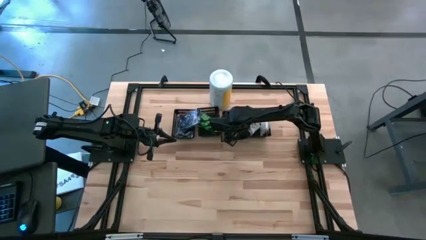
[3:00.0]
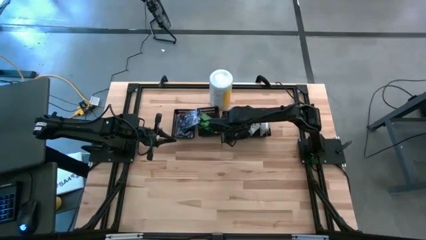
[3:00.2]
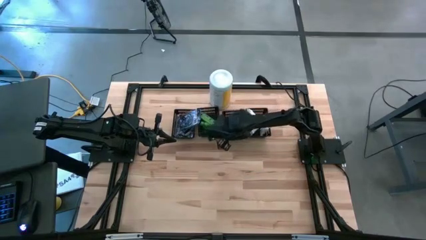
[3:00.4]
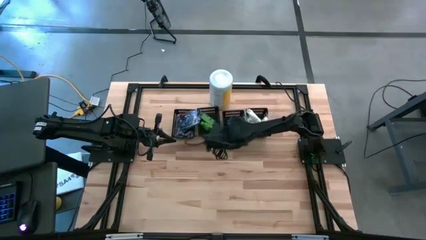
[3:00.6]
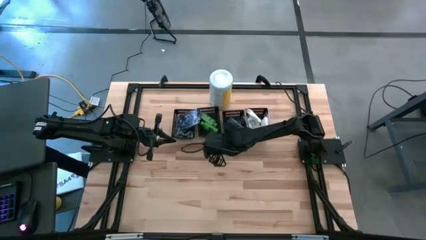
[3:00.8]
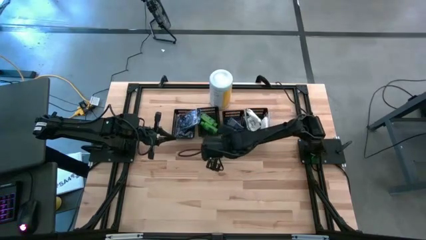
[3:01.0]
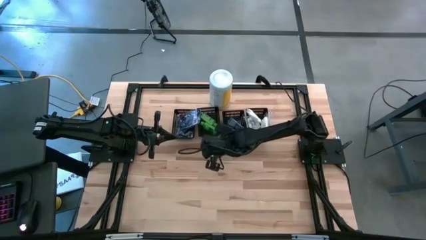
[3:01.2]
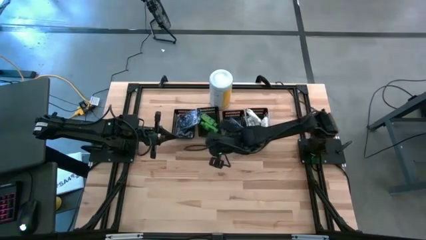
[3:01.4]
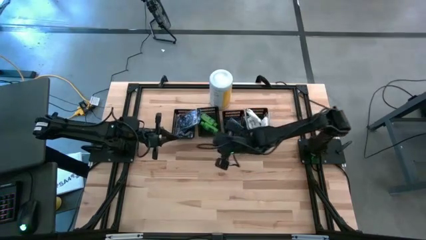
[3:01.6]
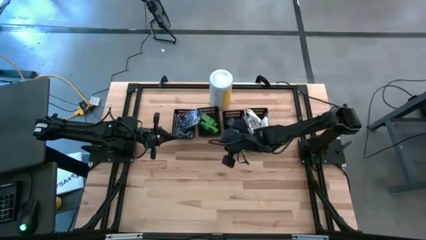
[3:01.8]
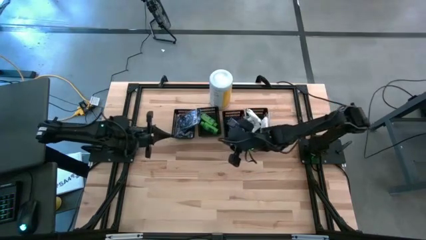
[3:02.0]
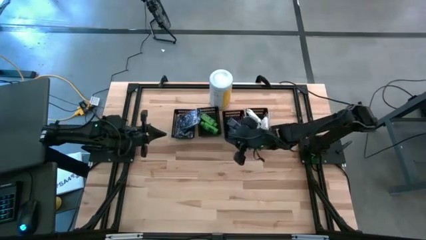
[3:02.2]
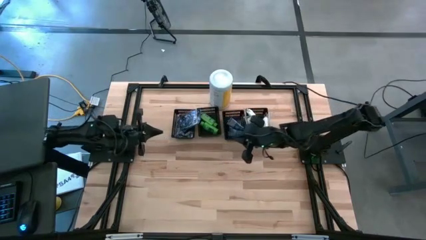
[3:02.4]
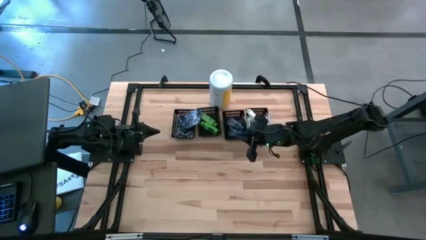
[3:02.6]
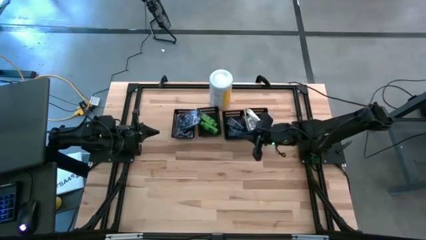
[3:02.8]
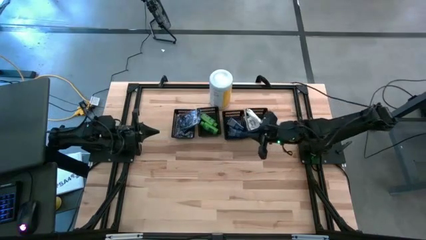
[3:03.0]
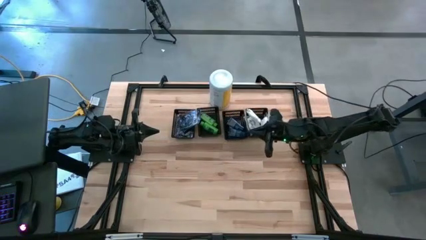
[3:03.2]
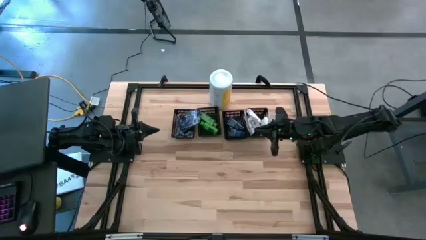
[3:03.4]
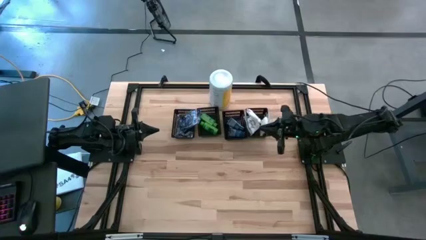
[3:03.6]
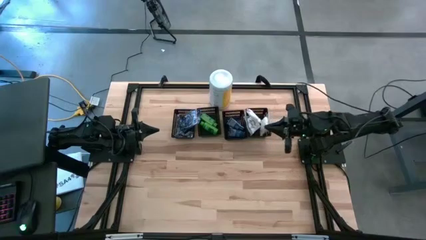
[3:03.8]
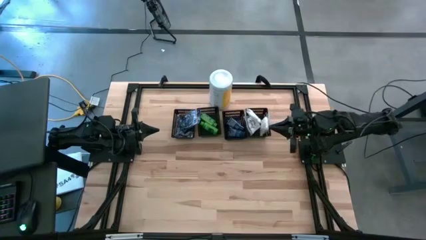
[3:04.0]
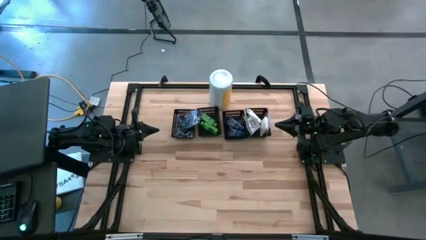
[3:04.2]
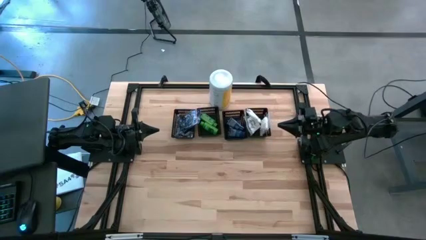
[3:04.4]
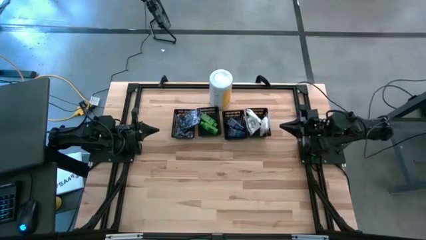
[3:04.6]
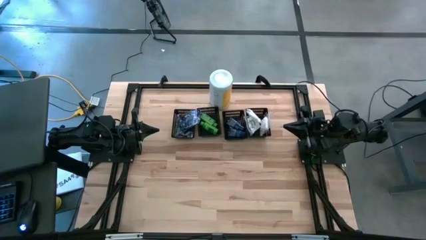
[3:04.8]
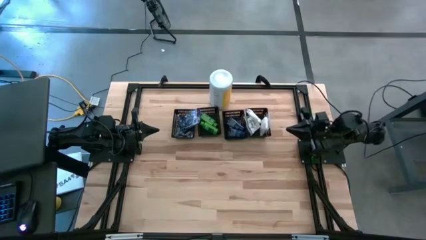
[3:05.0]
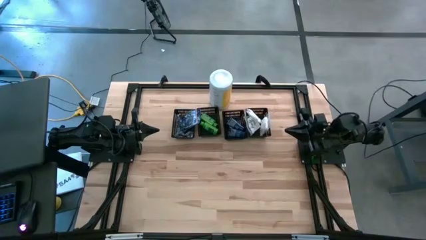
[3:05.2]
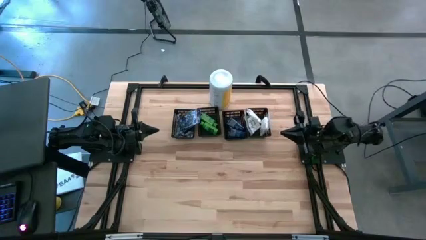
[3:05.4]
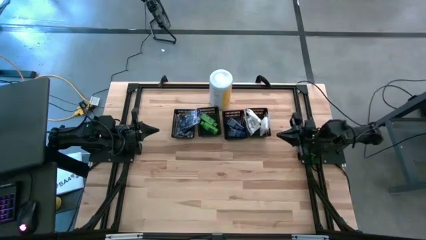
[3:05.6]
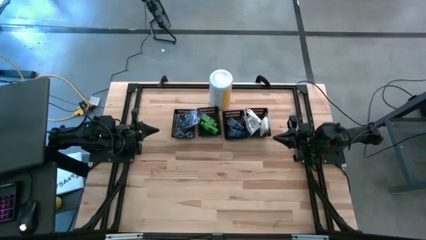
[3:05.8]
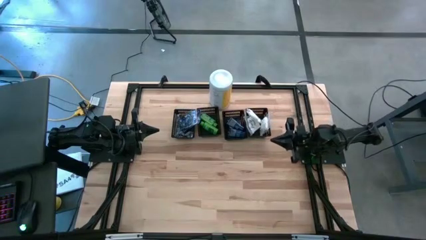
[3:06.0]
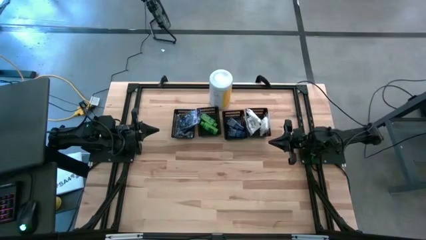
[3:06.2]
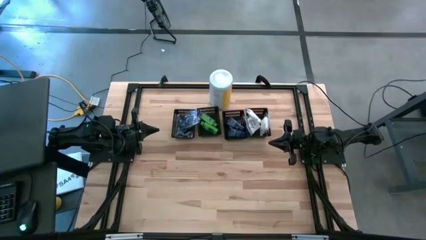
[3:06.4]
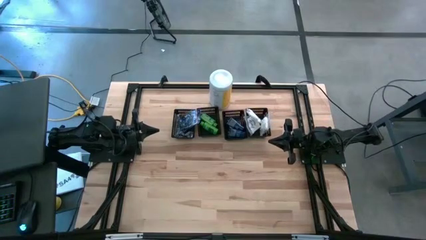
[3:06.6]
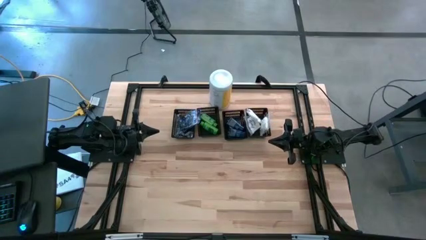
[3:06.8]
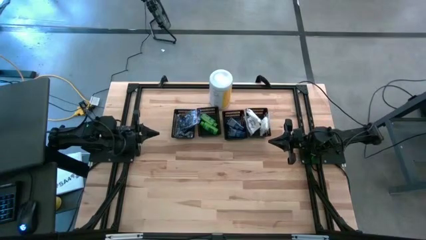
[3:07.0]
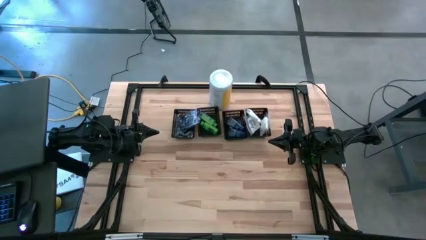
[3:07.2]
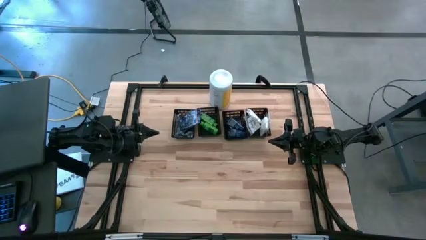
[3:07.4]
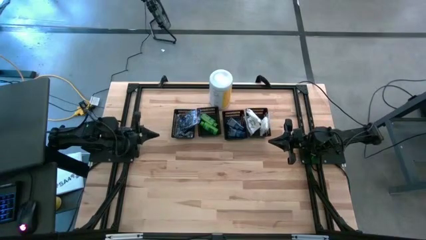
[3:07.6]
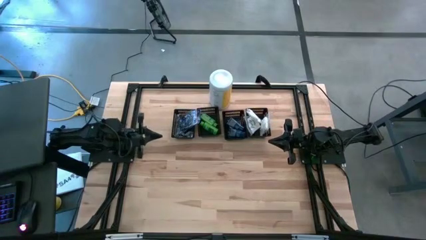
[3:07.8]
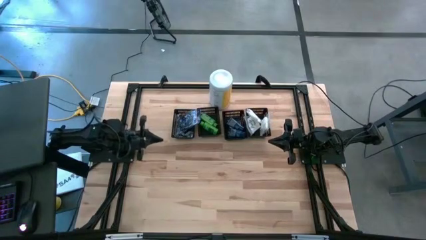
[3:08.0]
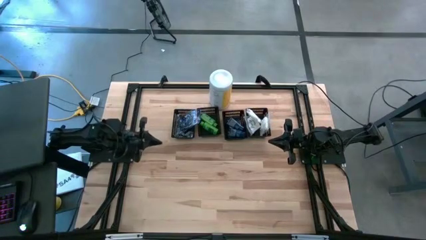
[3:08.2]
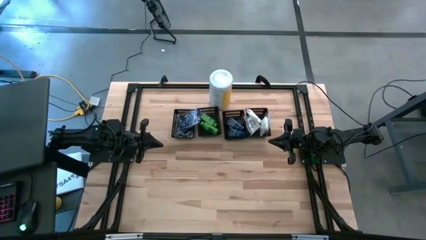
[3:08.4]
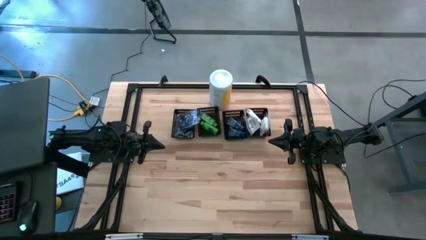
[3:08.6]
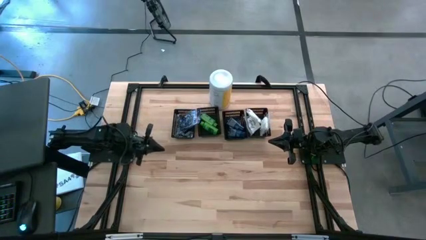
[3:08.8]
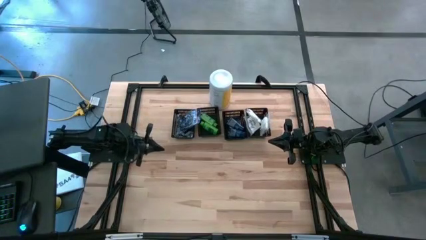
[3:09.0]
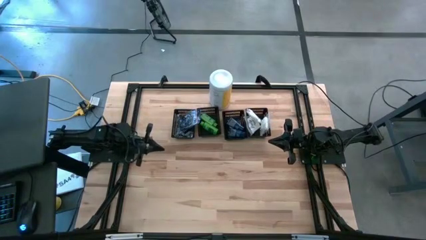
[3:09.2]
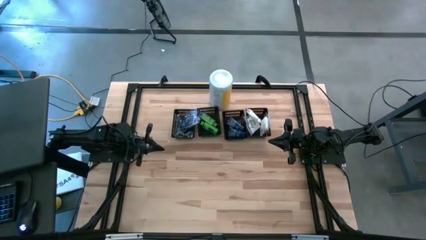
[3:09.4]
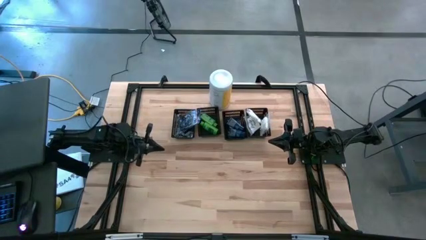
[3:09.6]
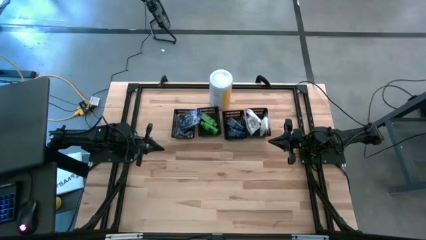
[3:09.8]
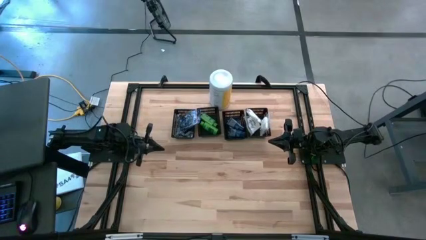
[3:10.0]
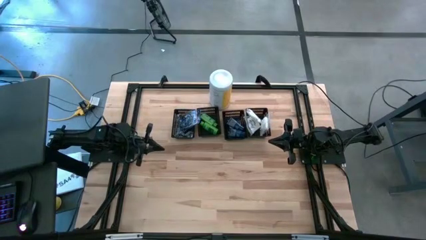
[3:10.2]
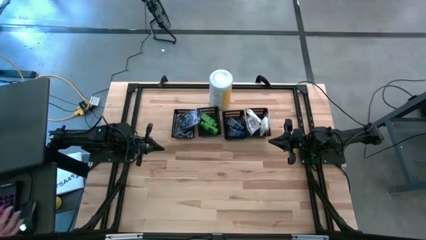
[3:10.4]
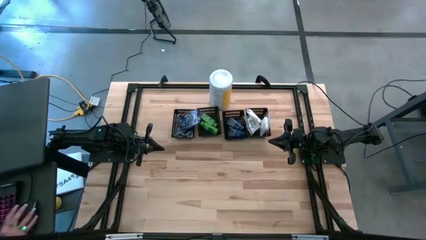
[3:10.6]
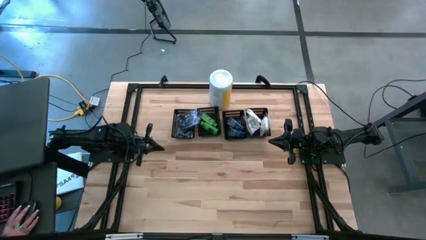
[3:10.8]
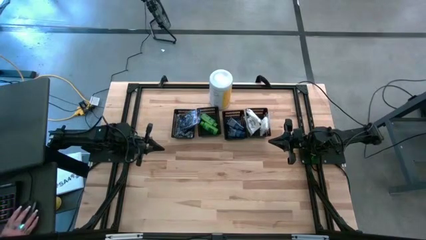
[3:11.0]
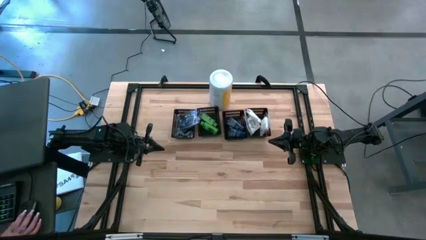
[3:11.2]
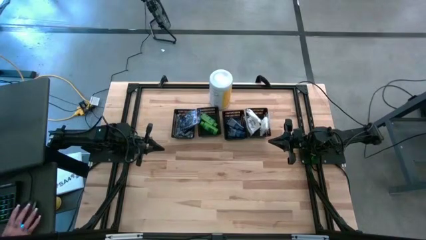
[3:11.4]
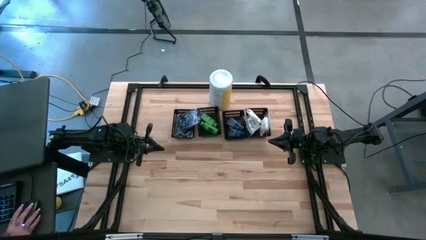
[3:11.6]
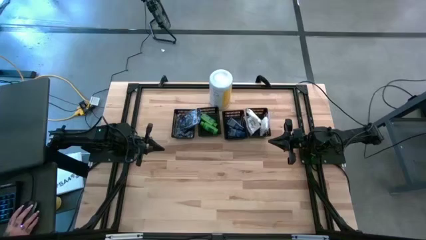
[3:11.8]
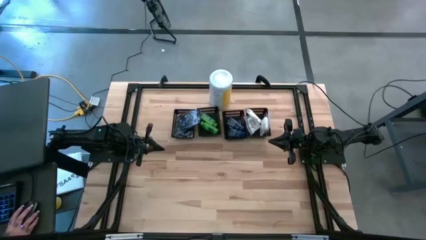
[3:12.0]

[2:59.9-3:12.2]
Task: Pick & Place Travel size toiletries
Return to Home Position

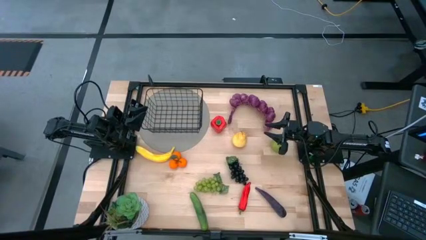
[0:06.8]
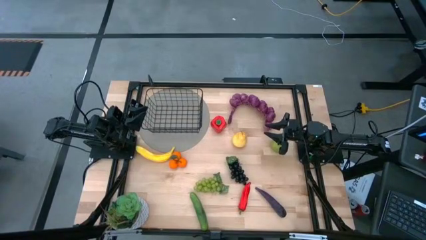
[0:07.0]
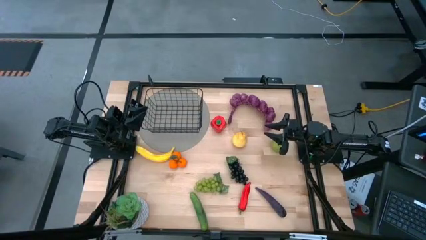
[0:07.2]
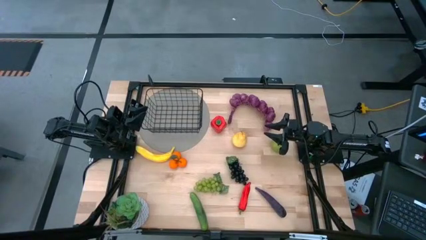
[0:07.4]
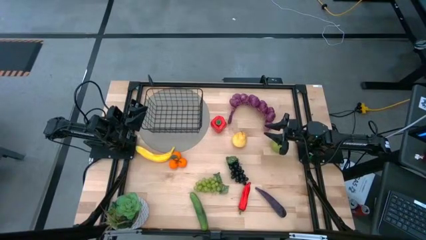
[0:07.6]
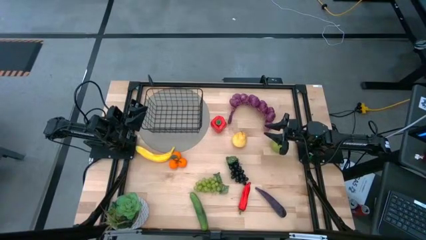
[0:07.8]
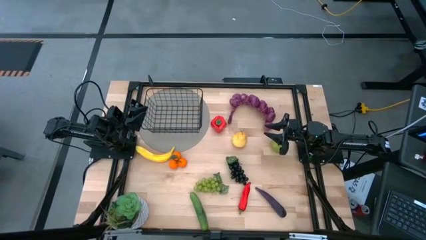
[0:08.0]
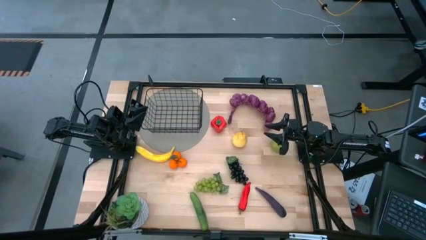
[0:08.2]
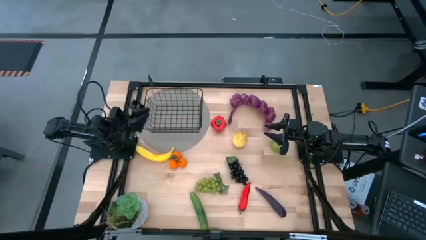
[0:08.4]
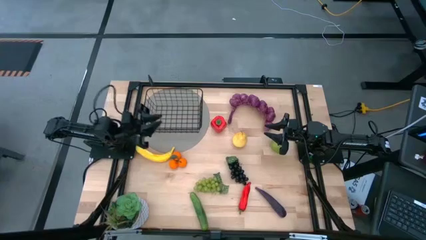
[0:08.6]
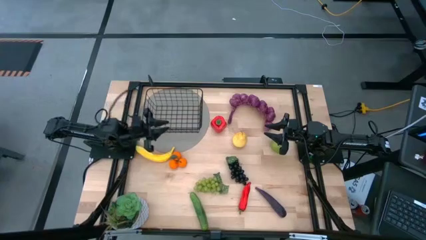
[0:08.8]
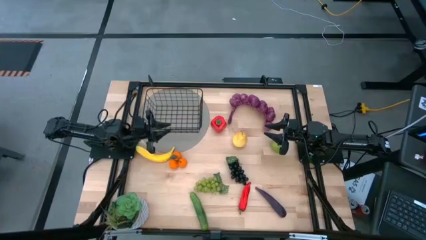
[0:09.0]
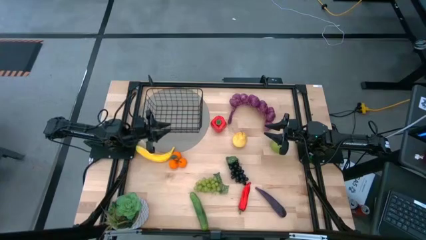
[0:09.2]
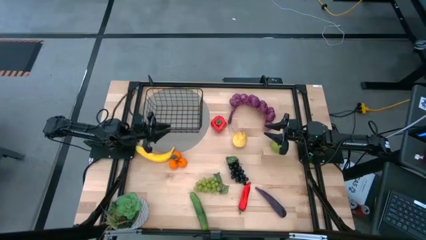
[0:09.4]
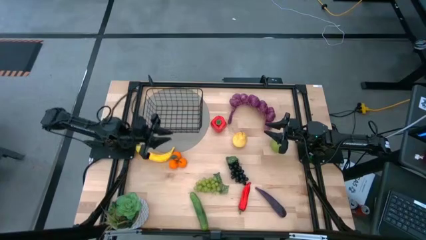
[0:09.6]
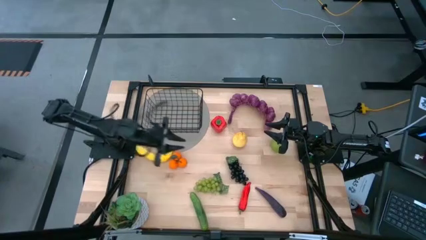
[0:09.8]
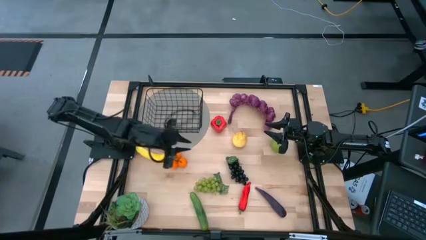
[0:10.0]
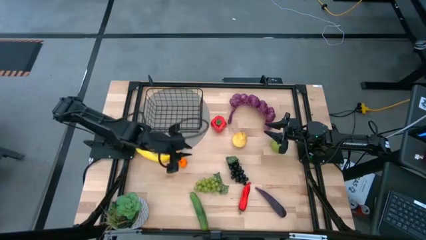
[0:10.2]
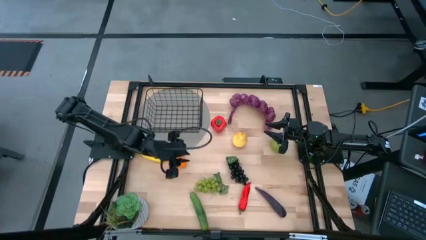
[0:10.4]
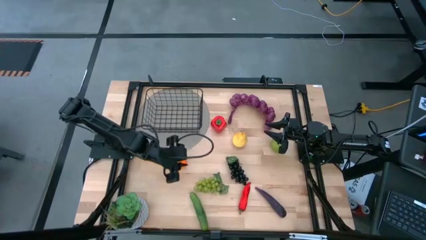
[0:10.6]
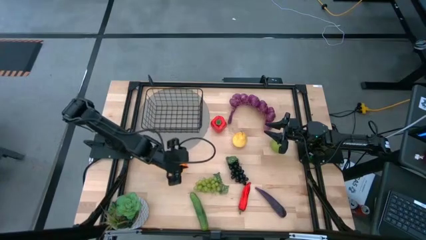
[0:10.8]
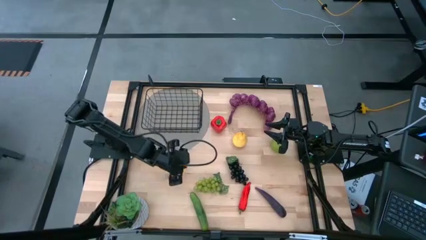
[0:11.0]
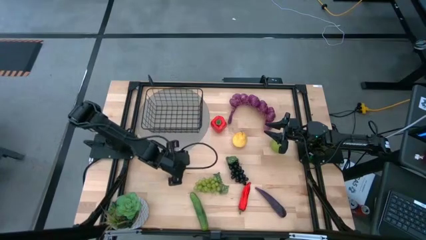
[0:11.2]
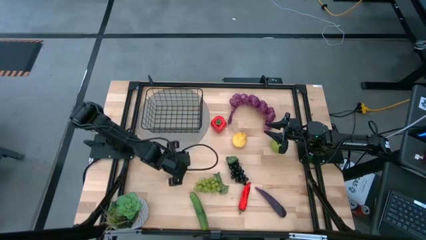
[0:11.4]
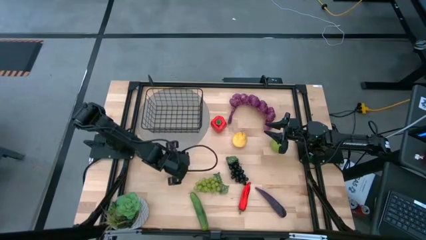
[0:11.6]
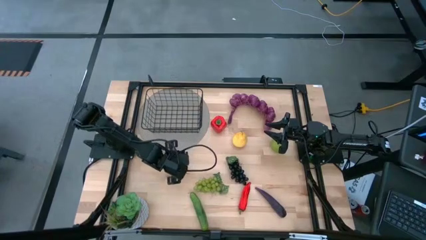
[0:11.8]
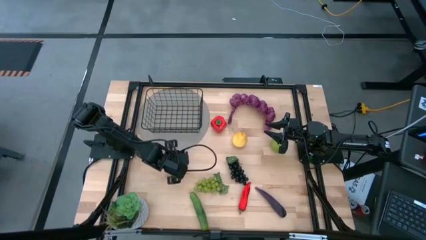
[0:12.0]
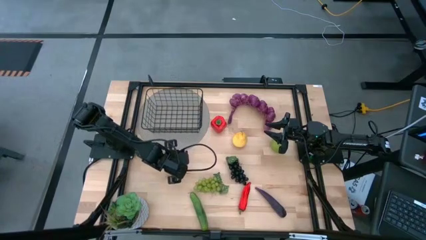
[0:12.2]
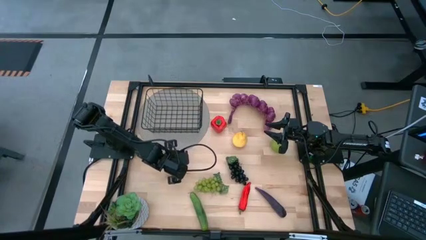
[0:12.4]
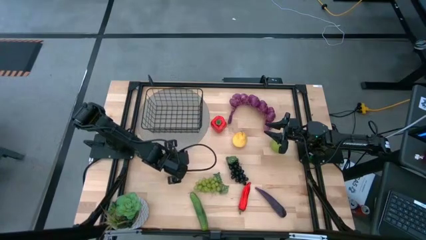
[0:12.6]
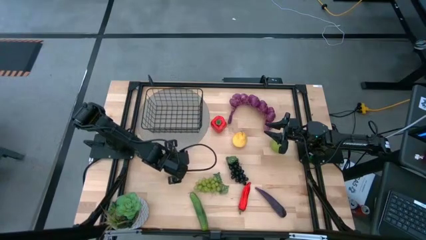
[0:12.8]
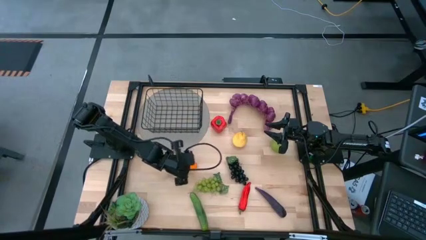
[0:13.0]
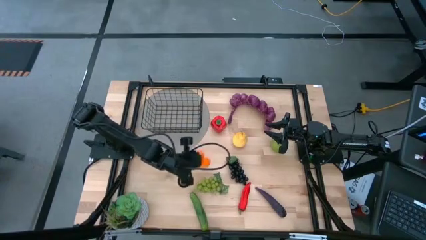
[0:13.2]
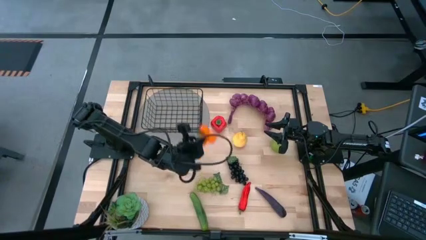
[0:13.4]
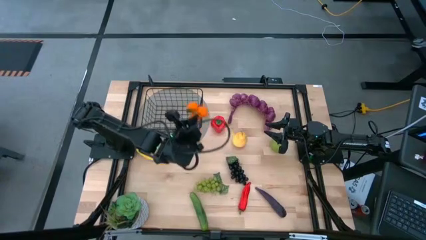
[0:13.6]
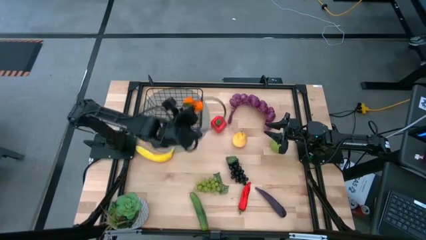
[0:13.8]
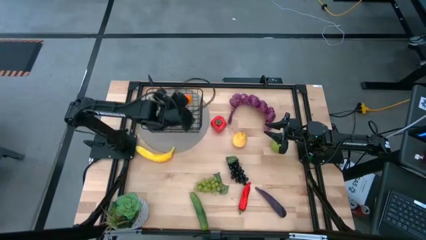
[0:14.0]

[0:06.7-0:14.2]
Task: Build produce basket
Put the tangerines into the wire basket
